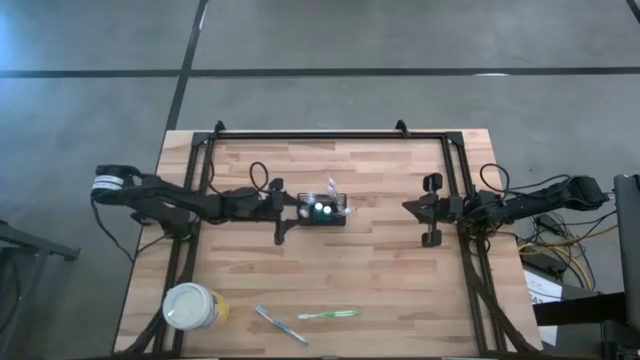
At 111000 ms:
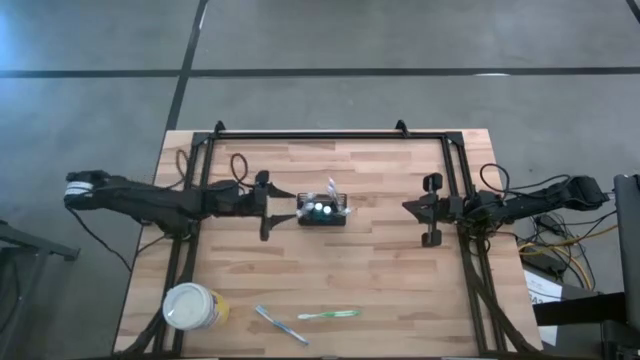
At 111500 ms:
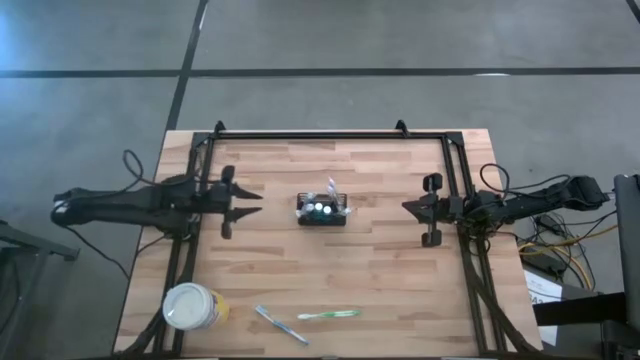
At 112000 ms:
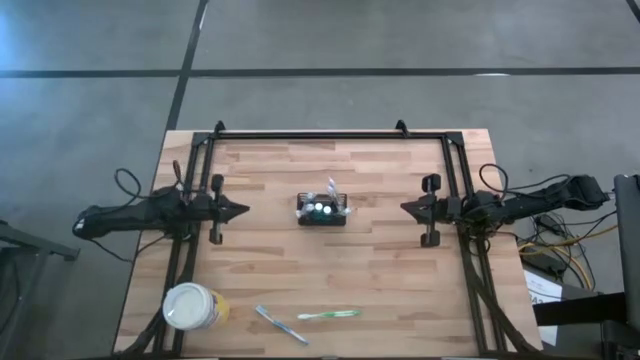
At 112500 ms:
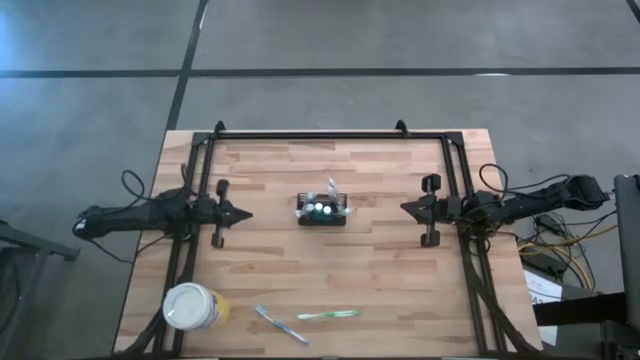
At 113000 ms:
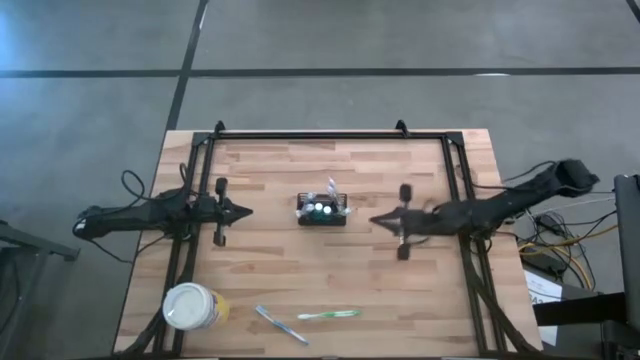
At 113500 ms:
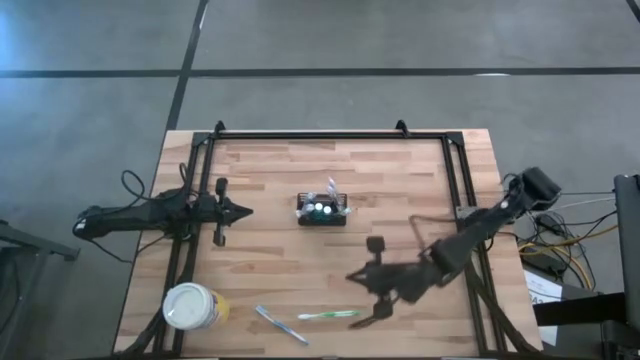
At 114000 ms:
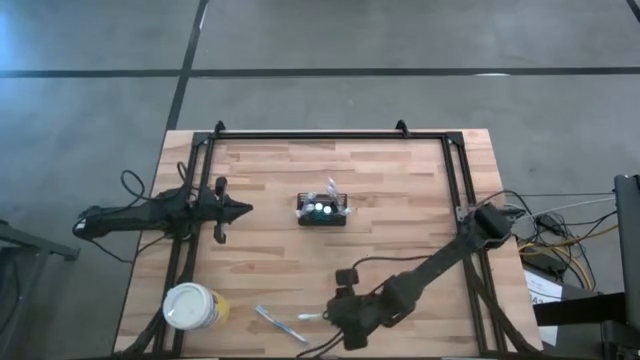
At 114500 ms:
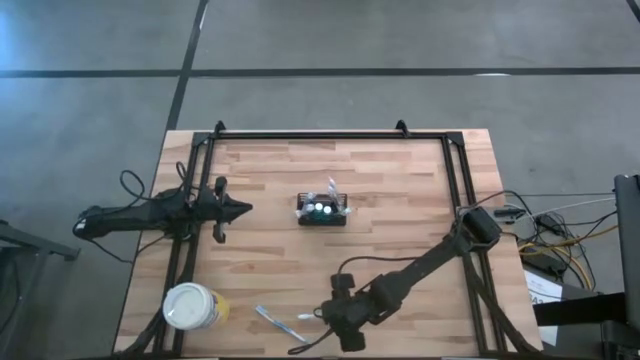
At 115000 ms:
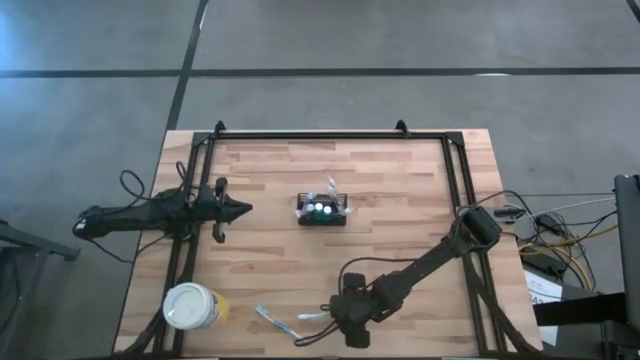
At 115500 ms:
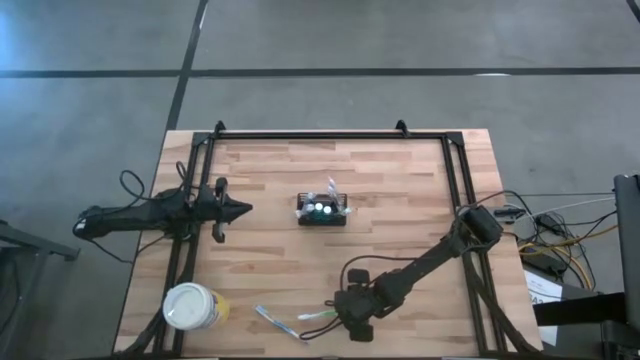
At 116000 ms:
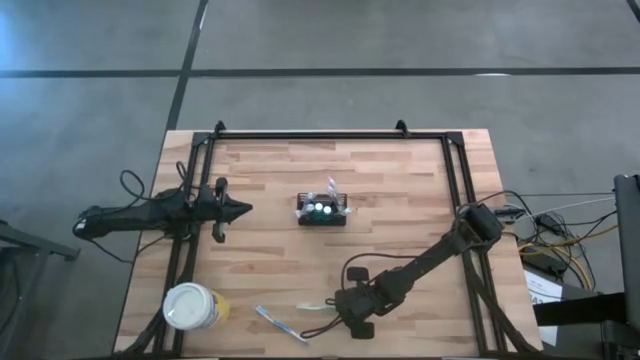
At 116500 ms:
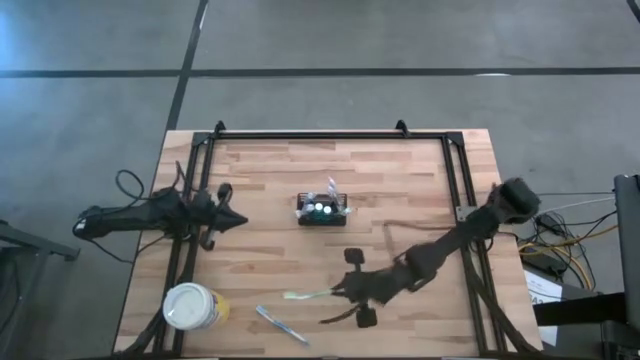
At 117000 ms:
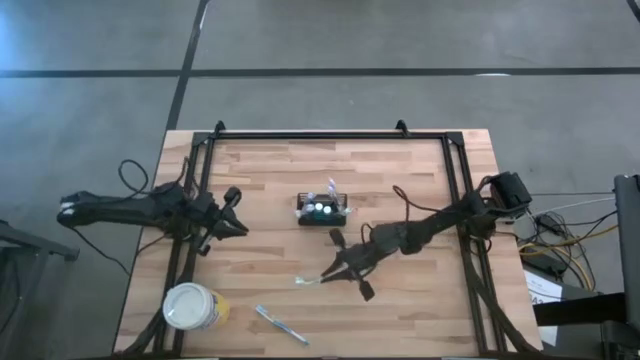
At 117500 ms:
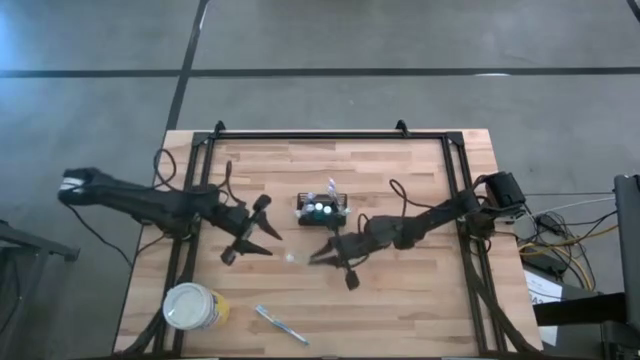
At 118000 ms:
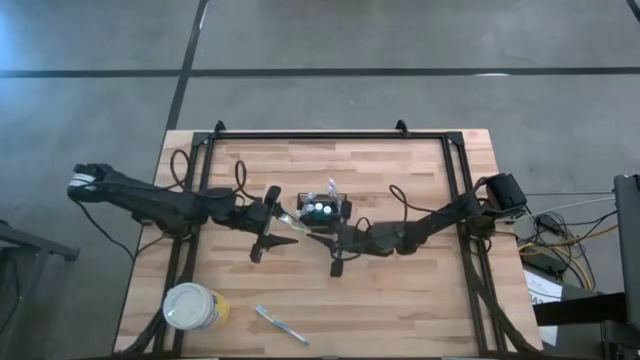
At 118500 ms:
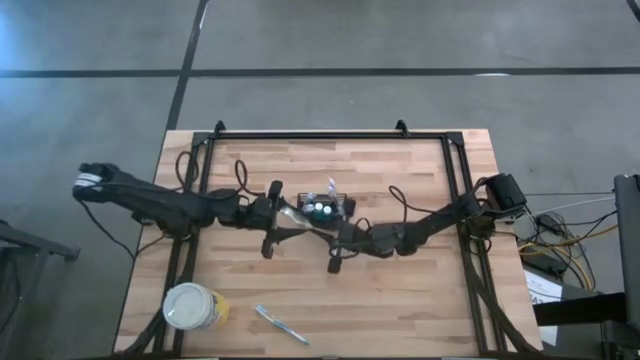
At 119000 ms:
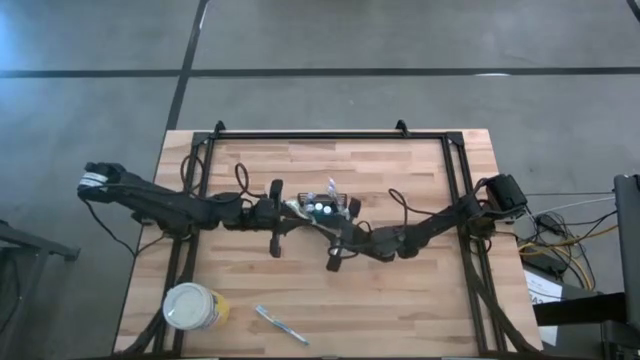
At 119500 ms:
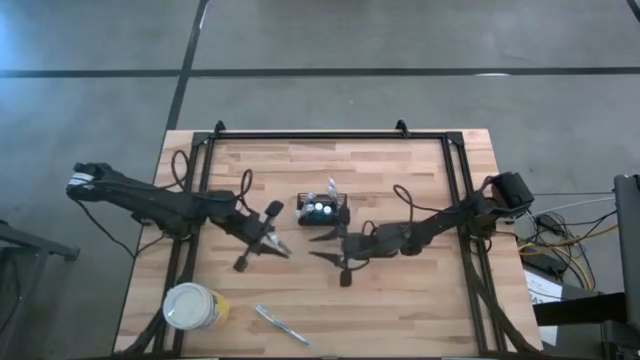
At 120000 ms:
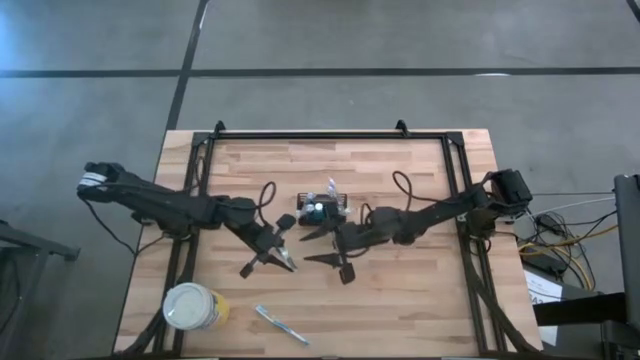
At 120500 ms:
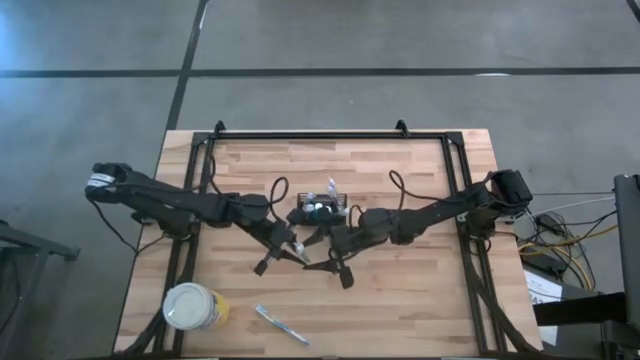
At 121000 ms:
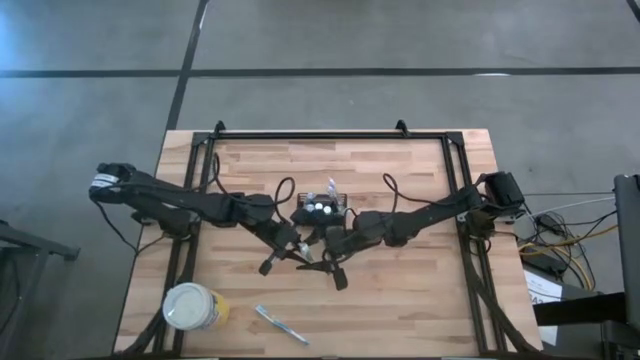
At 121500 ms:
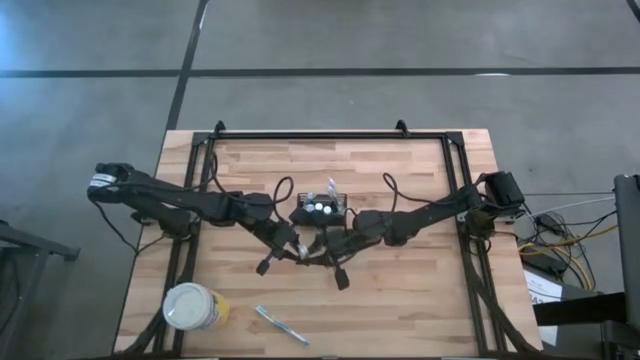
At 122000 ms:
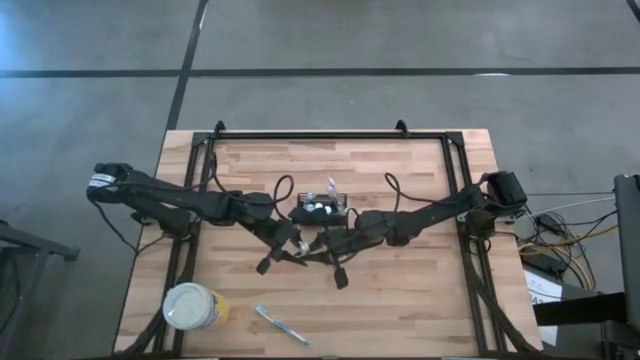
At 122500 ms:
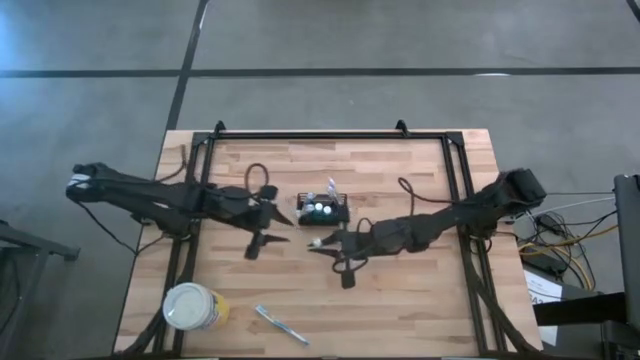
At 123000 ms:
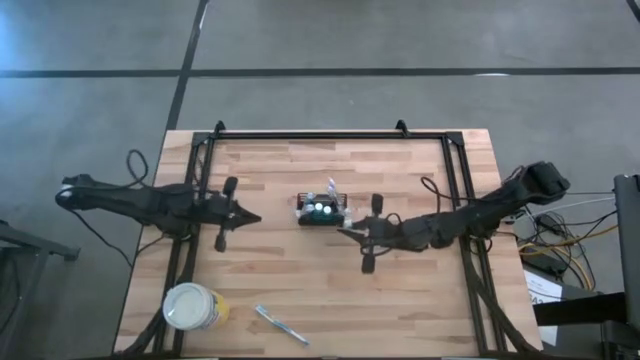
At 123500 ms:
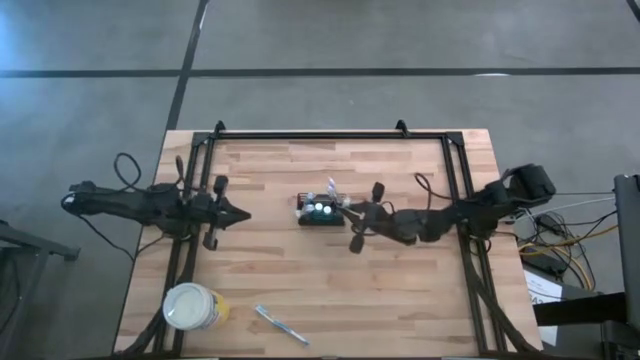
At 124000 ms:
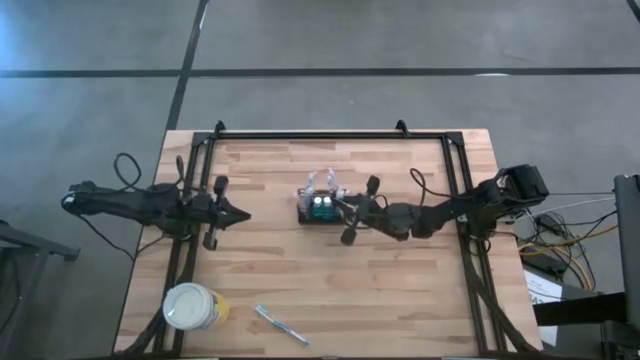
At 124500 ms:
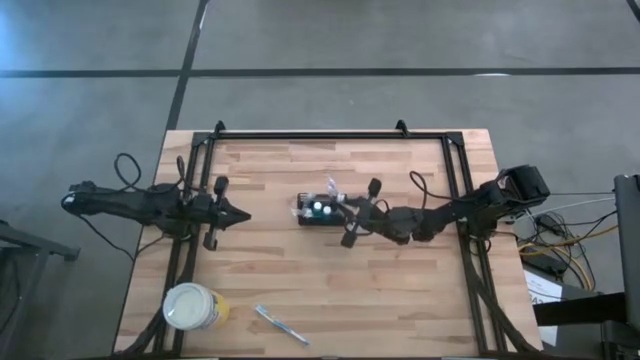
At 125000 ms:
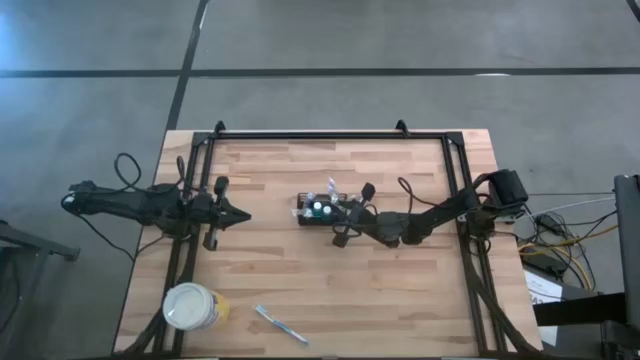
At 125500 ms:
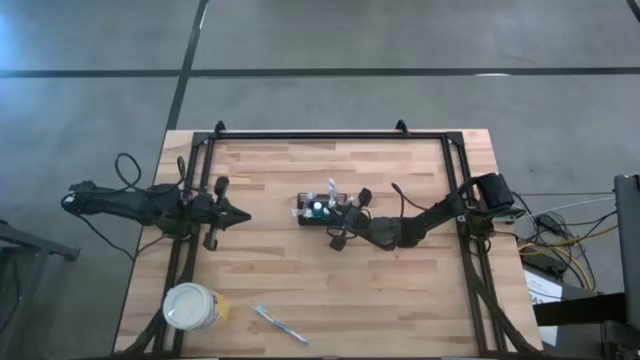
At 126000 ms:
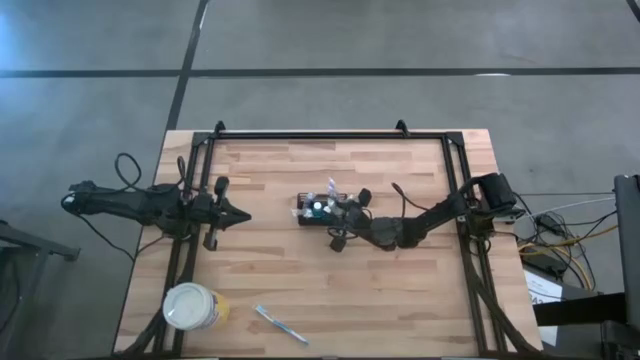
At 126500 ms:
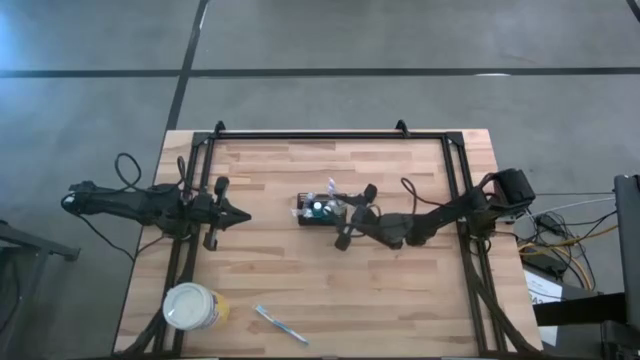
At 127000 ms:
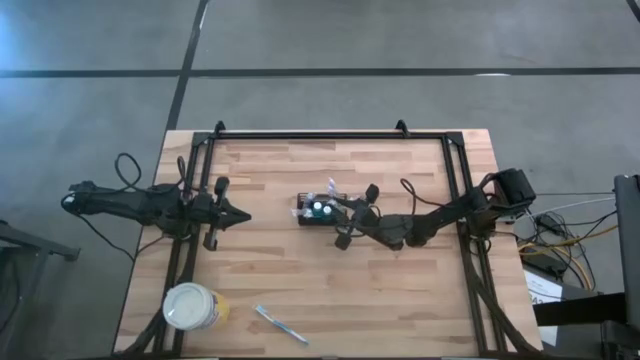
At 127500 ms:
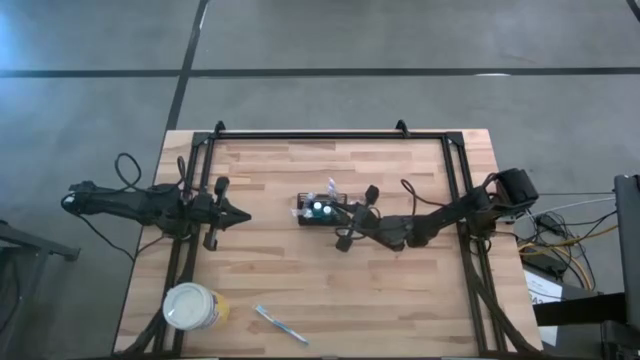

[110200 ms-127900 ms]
Task: Pick & Place toothbrushing station
Put the green toothbrush into the black wire organizer

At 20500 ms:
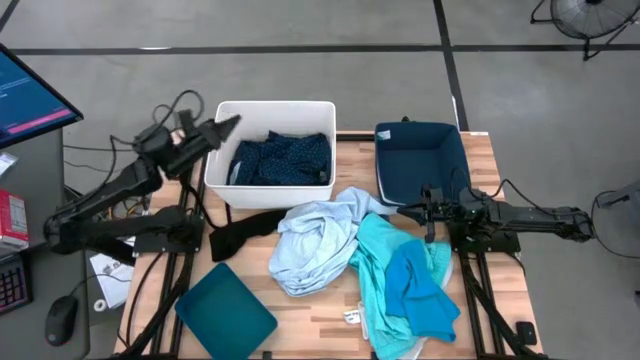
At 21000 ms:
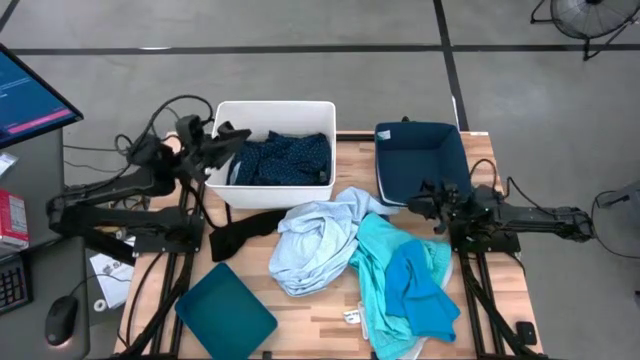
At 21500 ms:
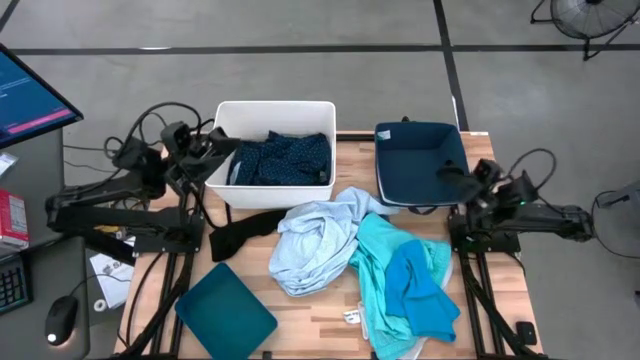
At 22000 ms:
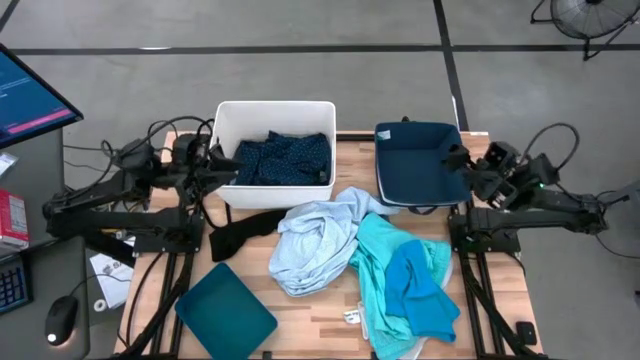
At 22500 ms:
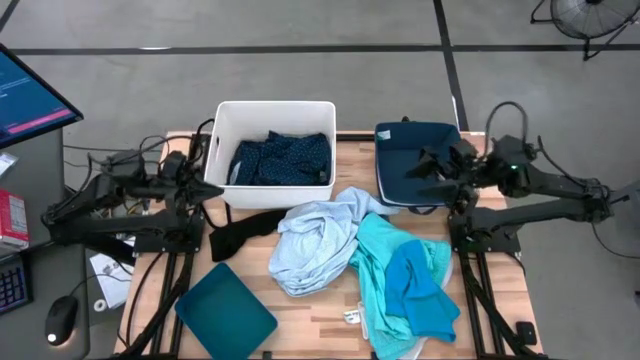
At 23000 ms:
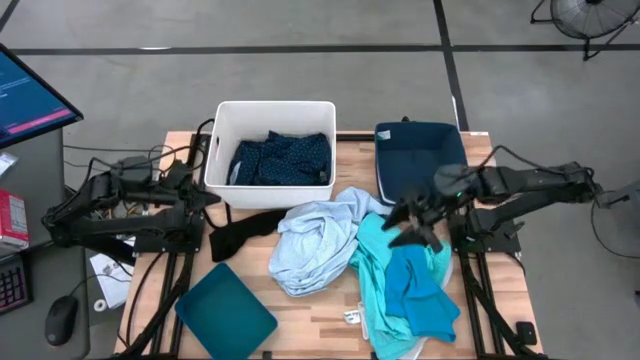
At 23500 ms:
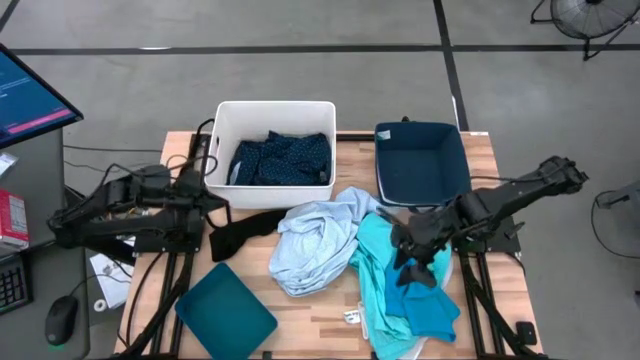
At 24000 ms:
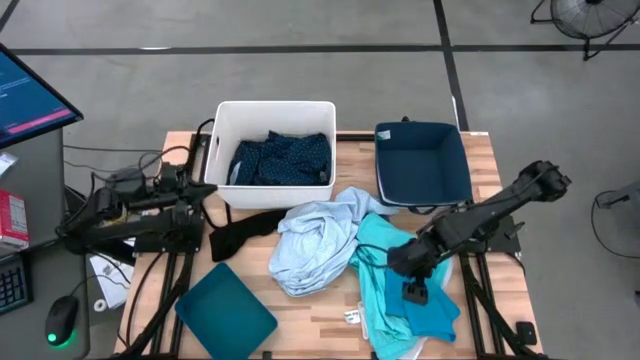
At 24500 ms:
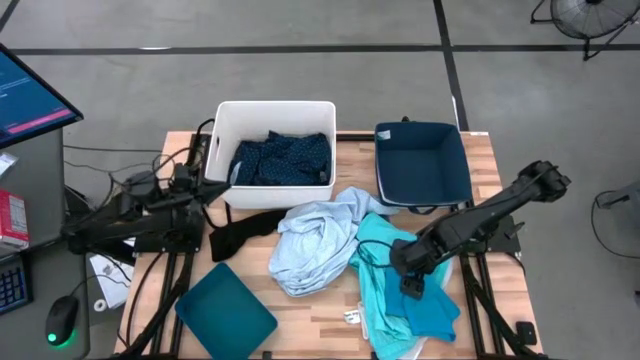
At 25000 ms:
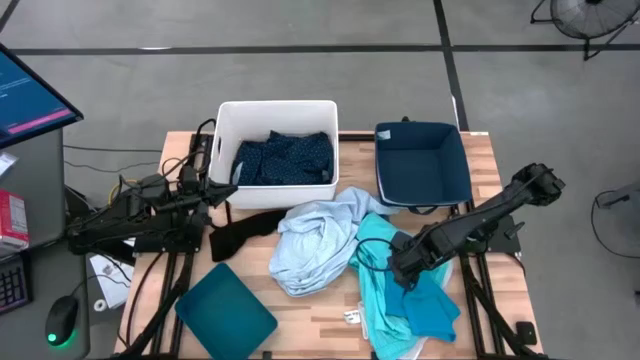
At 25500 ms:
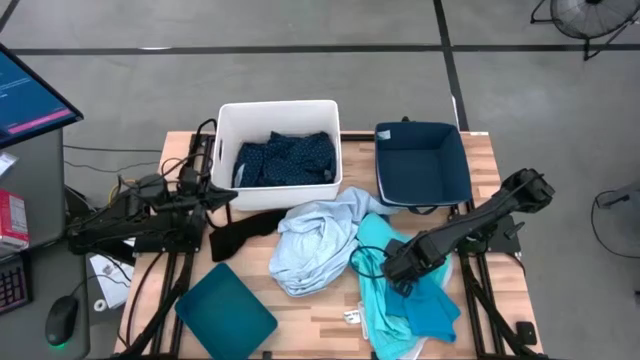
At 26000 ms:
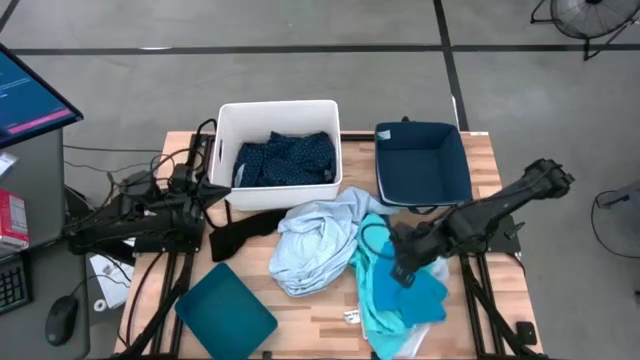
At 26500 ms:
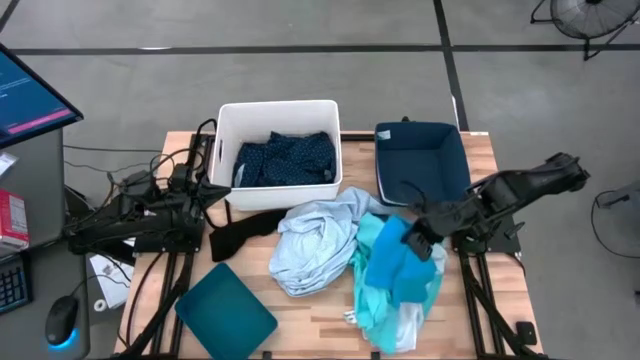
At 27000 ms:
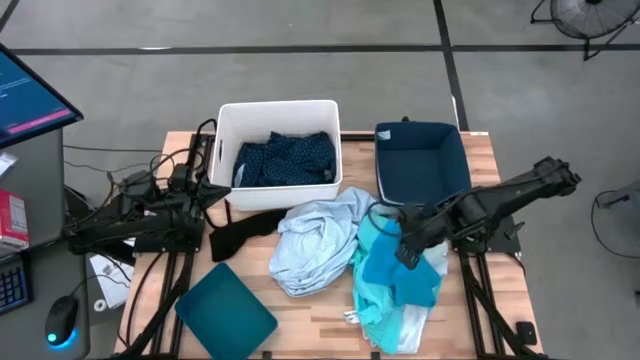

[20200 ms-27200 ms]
Task: Pick & Place Cloths
Put the blue shorts into the dark blue laundry organizer
